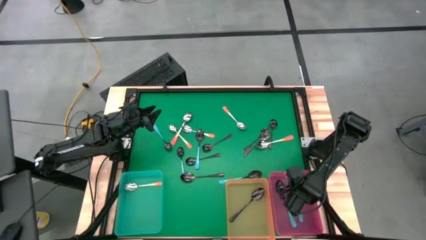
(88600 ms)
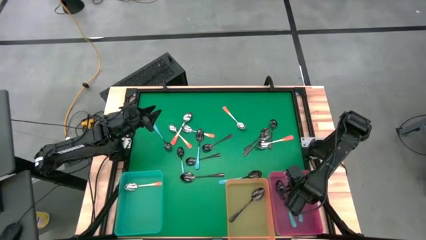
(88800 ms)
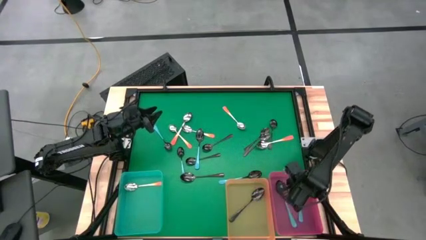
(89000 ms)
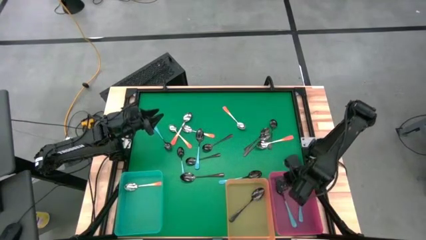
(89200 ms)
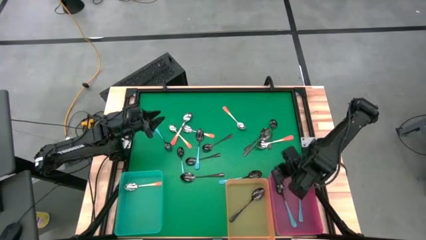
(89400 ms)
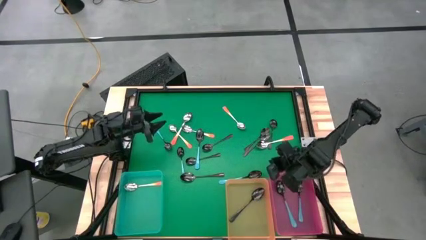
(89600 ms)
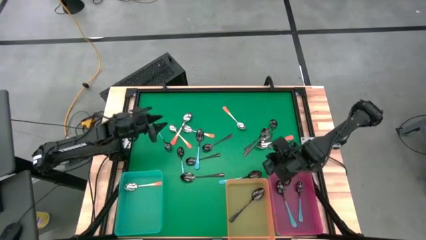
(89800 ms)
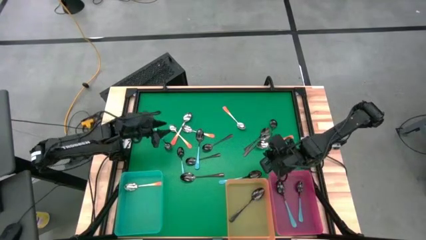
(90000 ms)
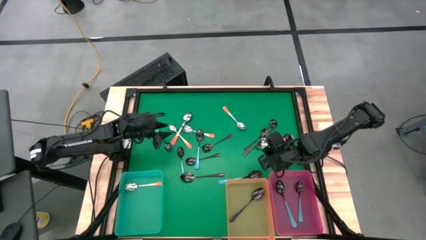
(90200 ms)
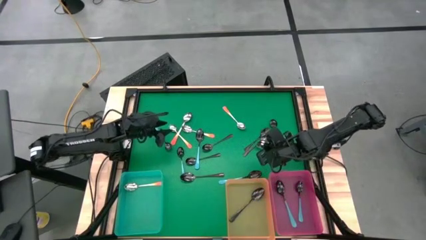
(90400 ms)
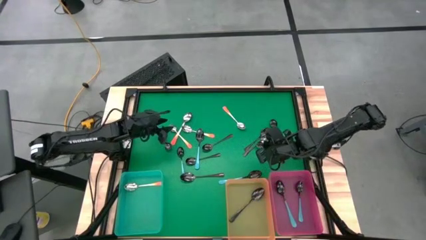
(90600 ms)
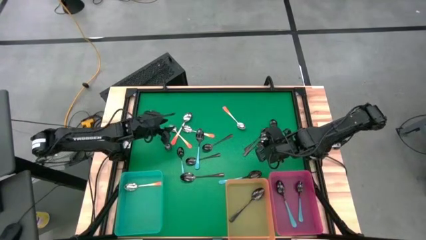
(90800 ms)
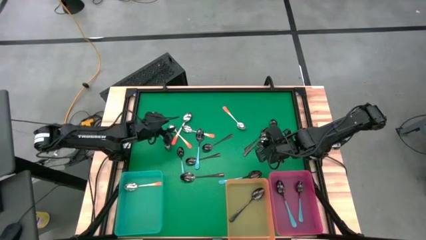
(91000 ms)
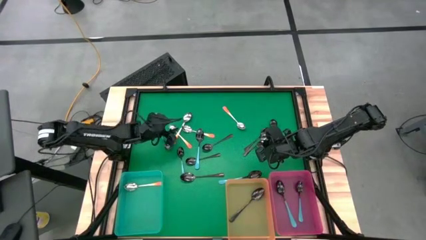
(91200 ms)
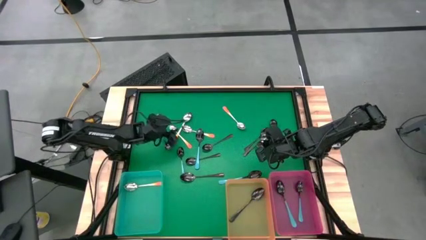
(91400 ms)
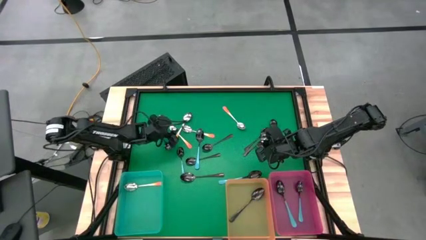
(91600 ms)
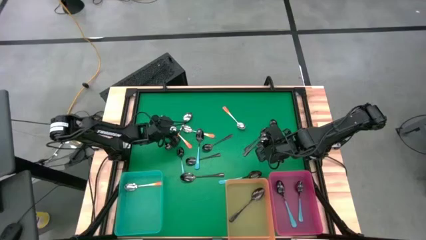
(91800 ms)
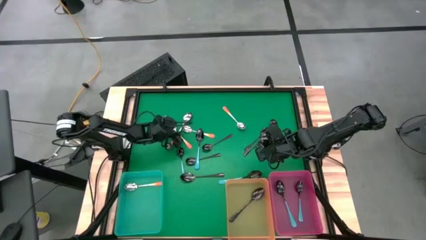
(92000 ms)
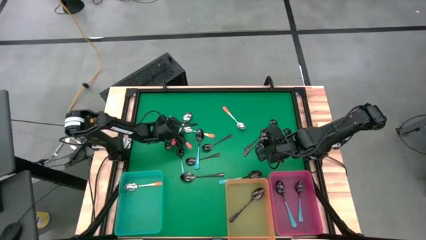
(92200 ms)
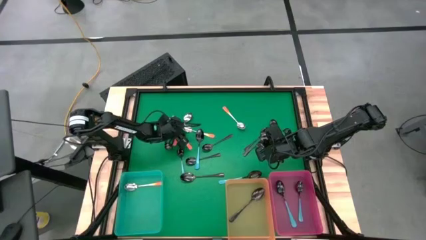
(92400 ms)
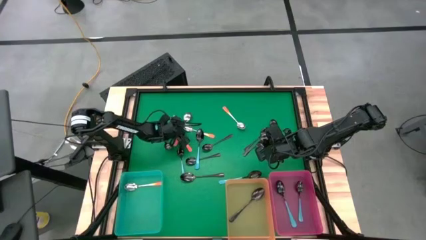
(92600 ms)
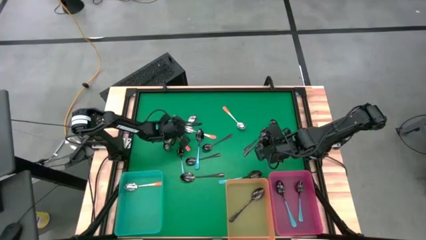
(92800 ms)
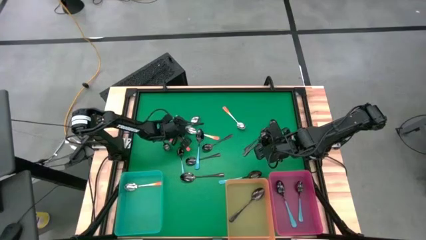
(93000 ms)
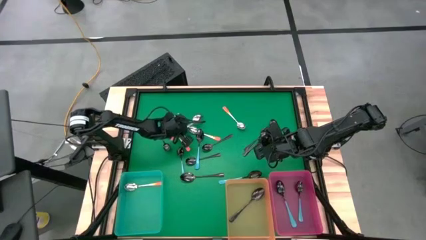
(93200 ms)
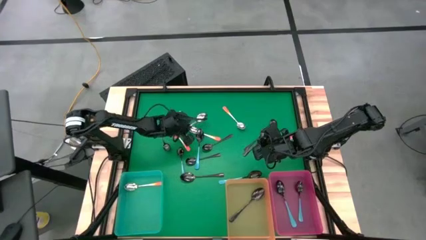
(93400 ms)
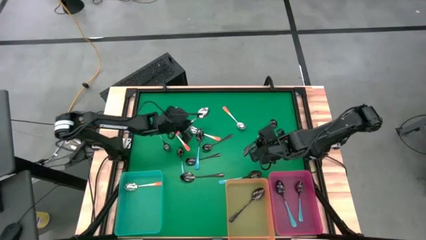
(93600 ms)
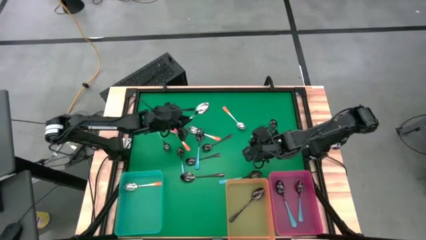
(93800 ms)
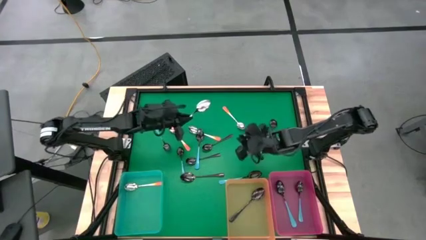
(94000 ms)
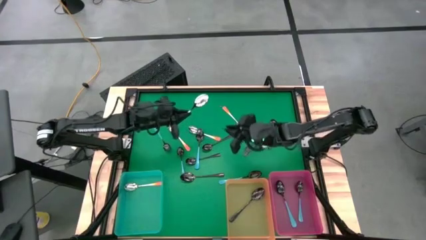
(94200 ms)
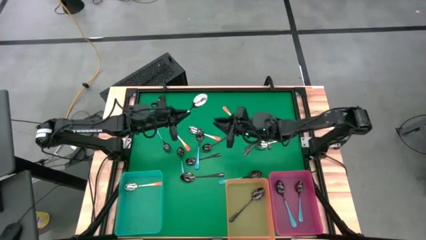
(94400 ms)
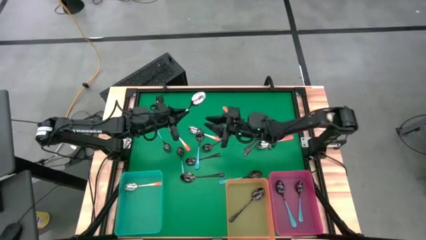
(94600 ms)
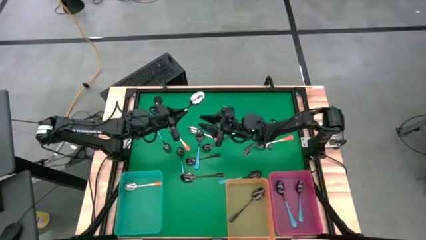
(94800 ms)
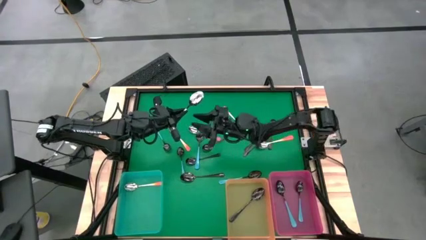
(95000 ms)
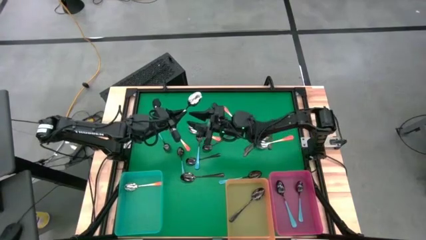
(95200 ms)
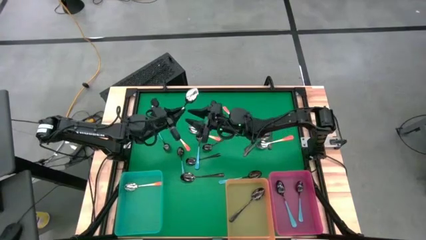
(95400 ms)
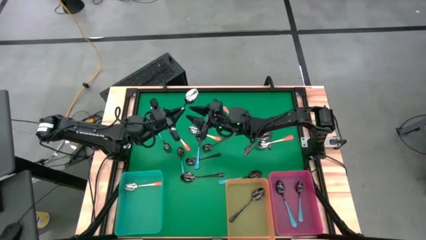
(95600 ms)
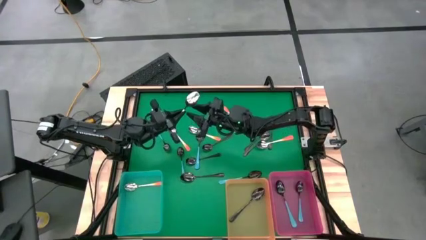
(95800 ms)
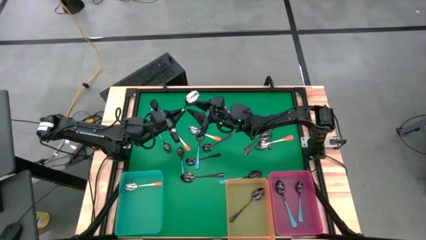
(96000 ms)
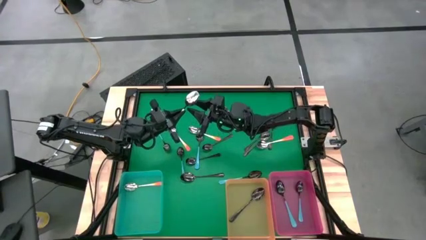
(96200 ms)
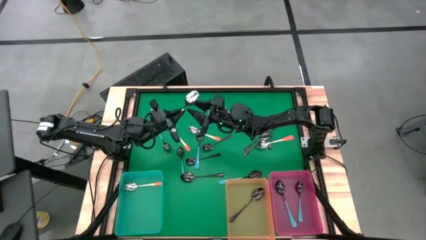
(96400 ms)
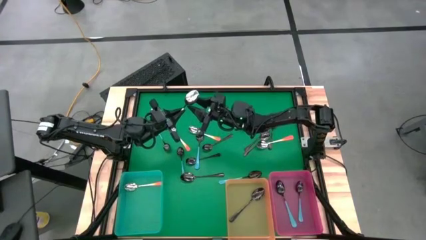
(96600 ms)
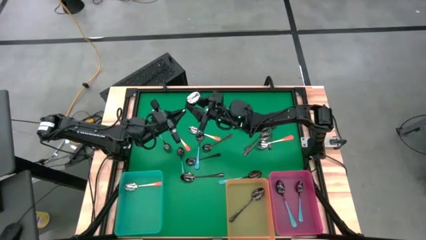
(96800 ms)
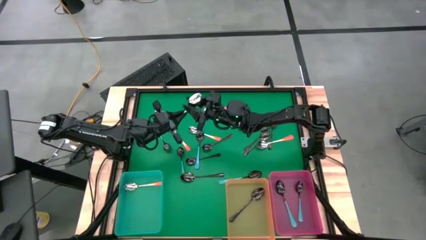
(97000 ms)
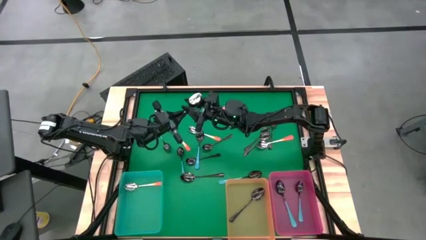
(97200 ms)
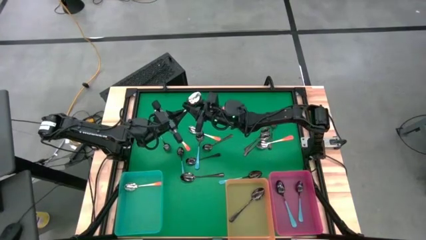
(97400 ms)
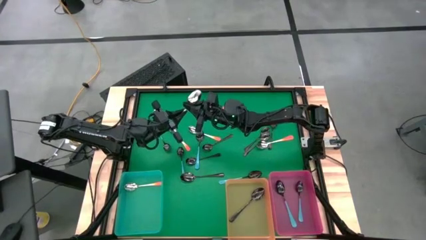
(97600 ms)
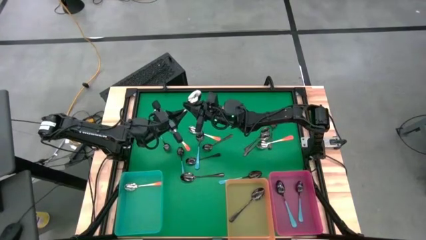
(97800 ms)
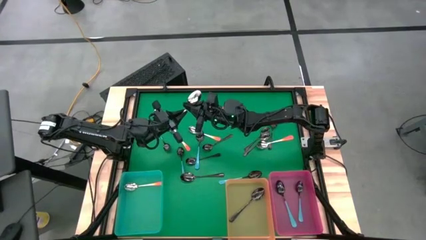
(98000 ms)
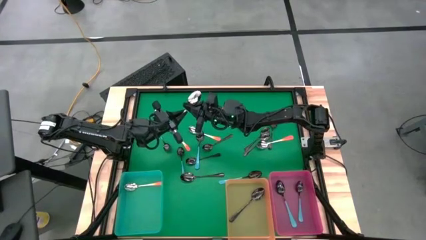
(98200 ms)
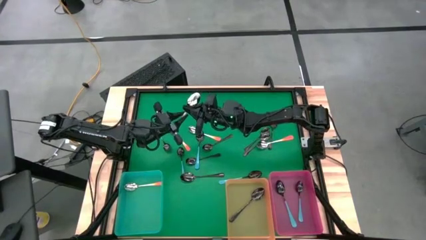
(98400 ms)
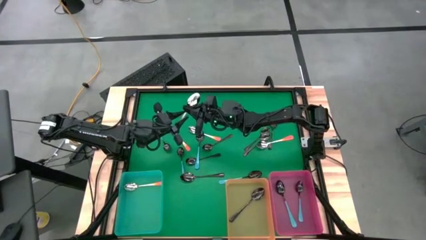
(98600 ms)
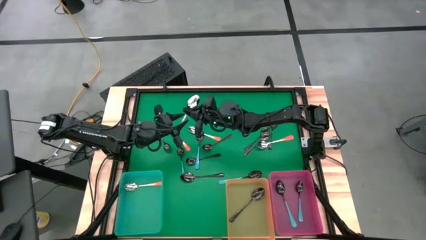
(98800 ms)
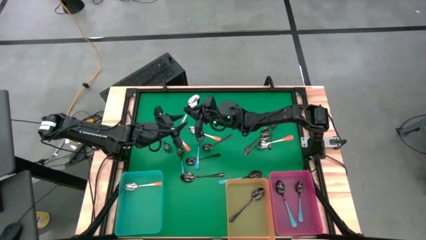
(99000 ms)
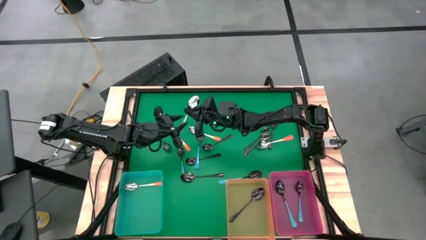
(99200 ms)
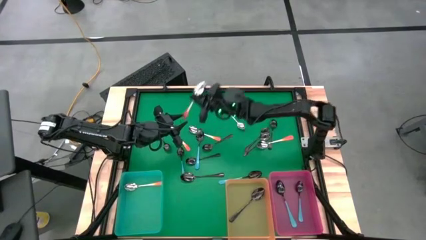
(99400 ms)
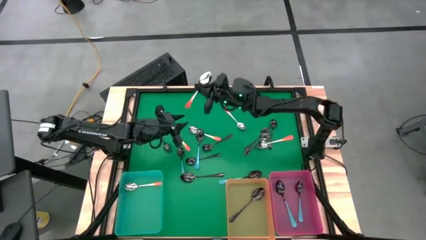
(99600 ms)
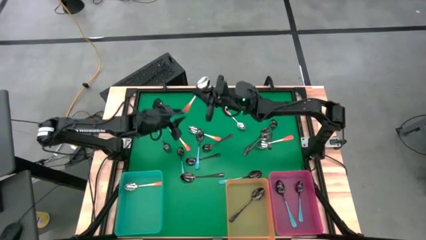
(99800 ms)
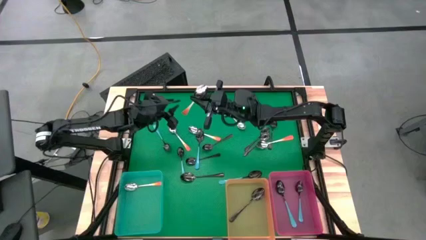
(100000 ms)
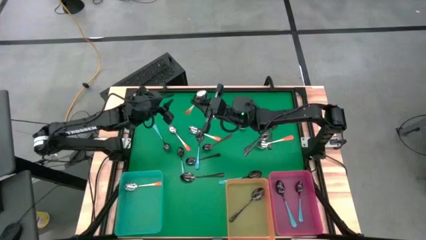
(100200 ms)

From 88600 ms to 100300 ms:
Task: Sort silverware by color (type)
Put the orange spoon into the green bin

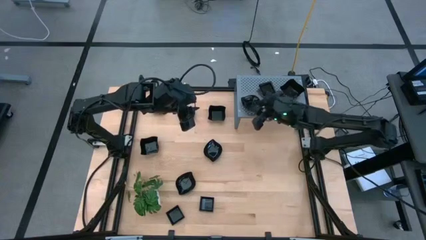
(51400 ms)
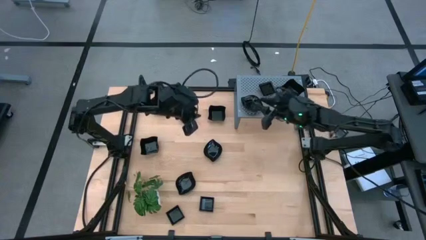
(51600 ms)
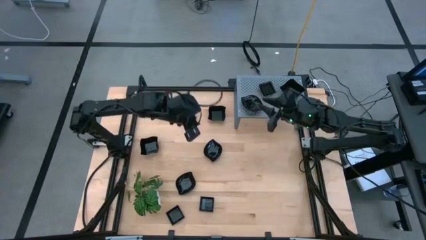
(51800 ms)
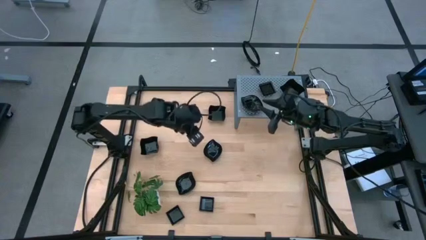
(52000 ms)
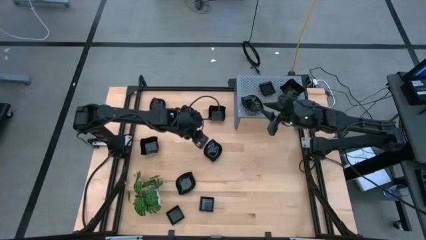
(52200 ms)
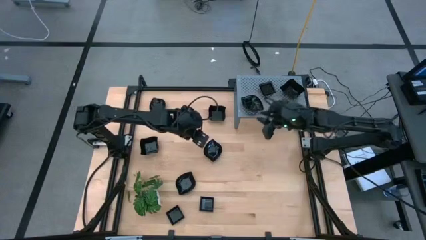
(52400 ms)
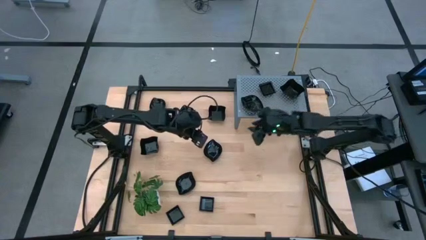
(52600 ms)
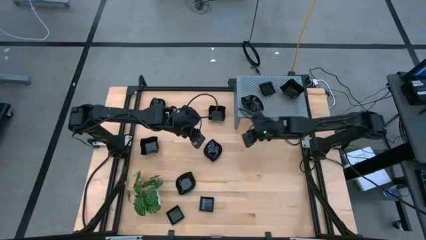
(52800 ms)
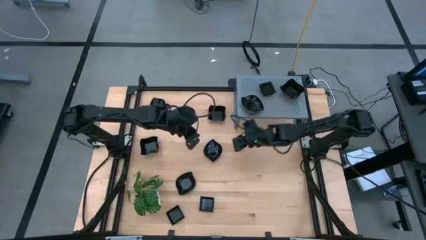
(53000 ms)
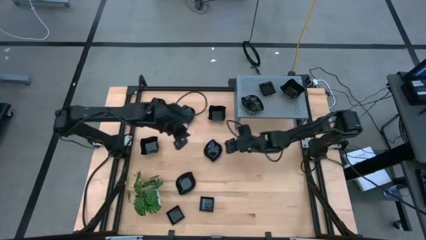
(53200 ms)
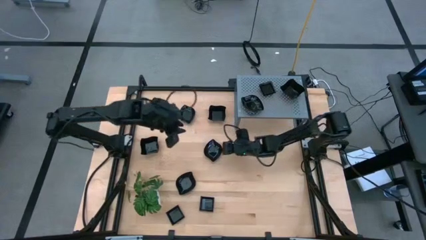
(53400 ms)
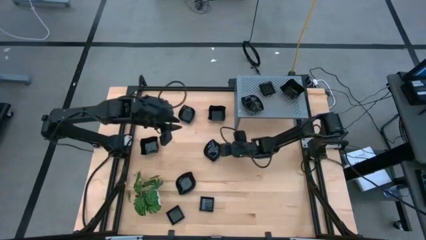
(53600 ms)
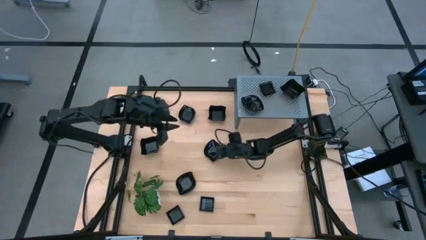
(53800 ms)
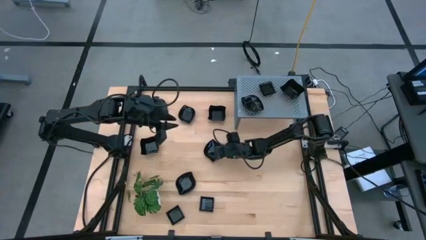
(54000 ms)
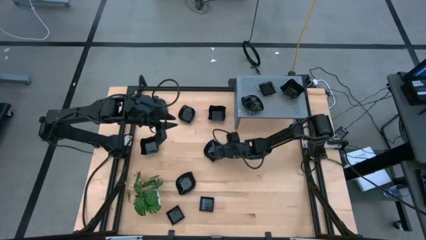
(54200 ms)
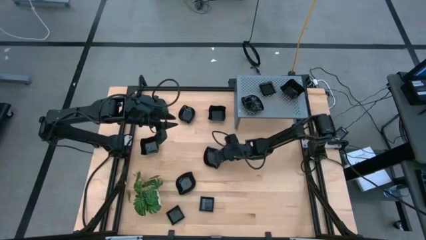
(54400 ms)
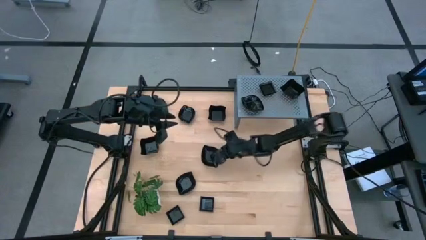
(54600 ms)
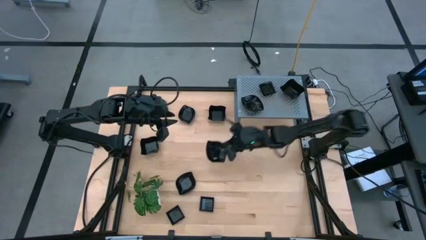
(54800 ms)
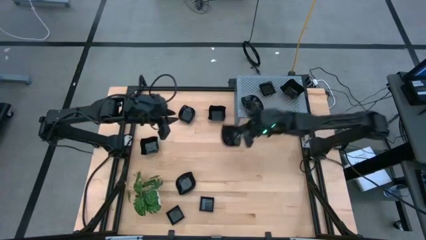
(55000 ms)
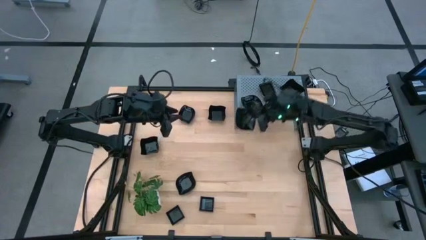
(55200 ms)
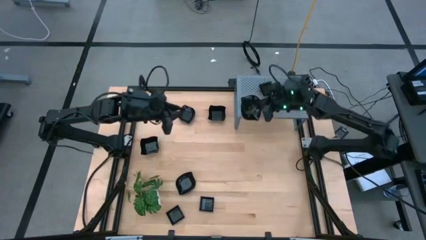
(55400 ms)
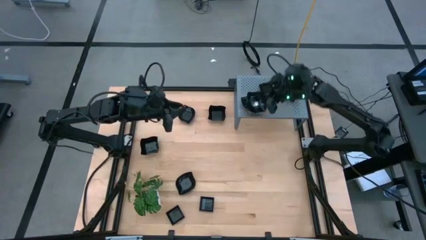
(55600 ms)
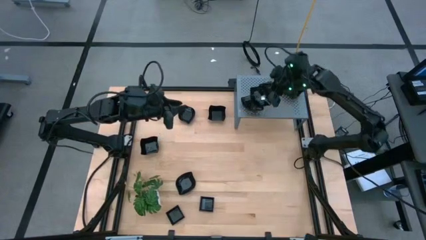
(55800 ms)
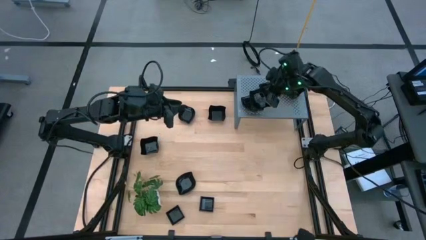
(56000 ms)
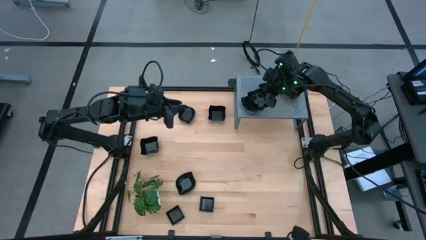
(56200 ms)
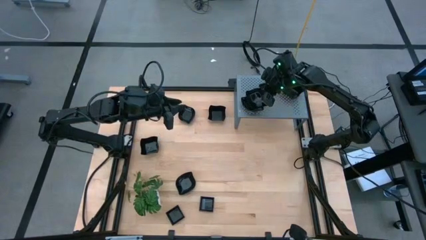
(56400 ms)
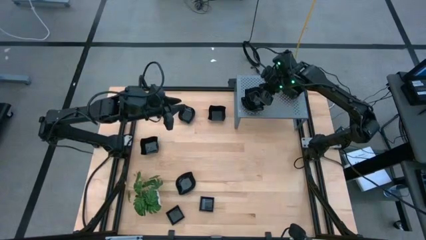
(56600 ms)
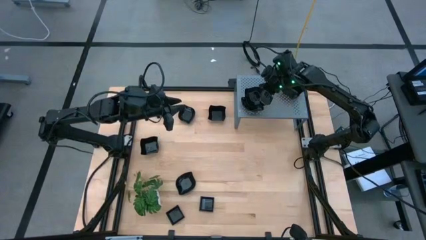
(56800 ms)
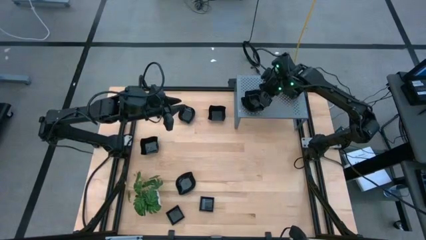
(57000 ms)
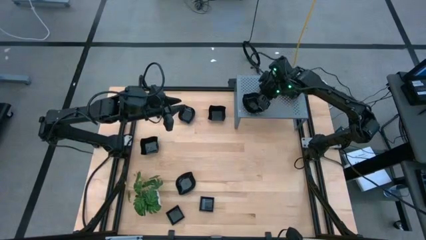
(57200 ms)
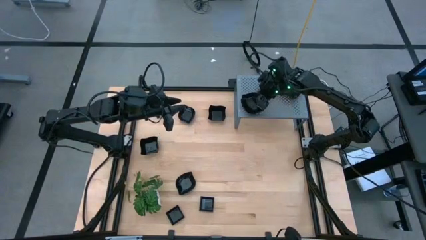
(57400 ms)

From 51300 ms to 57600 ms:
Task: Pick & Place Mini shaped plates
Stack the leaf-shaped plate on top of the other leaf-shaped plate
